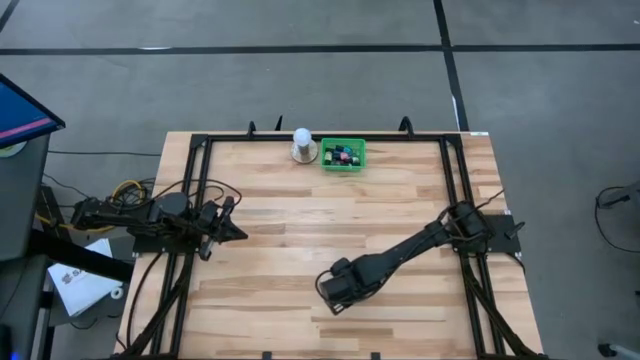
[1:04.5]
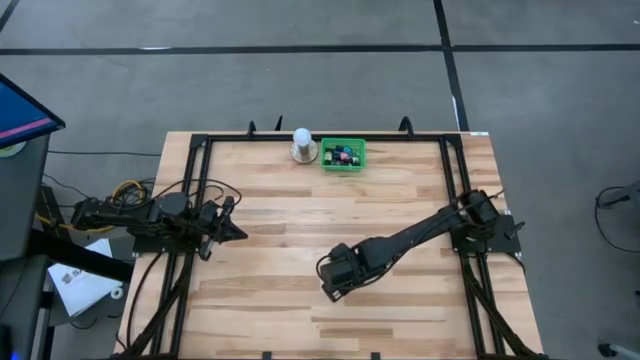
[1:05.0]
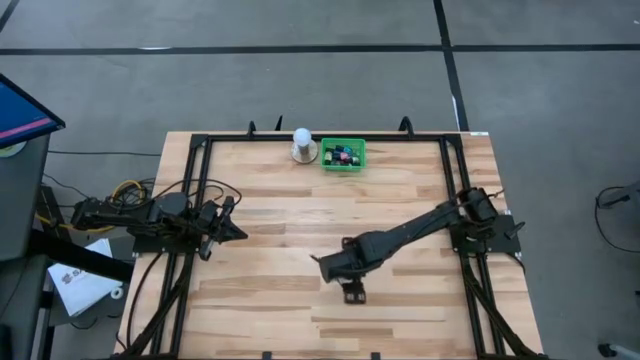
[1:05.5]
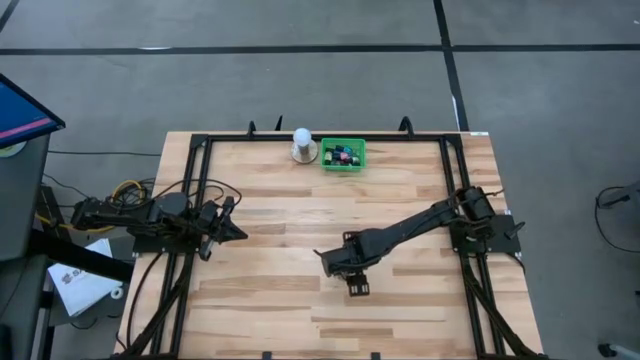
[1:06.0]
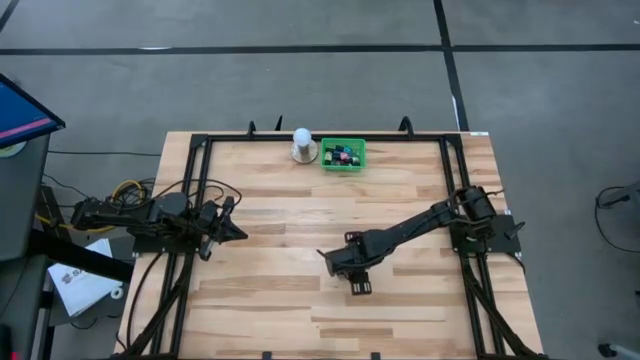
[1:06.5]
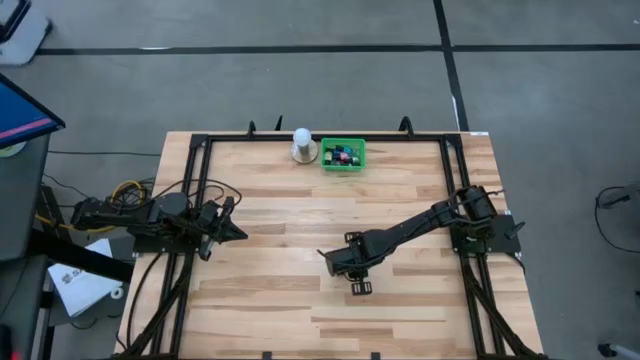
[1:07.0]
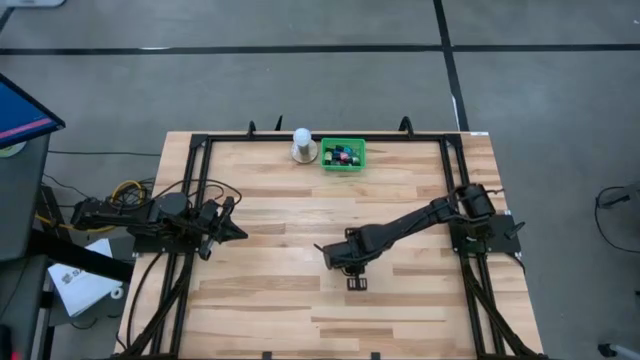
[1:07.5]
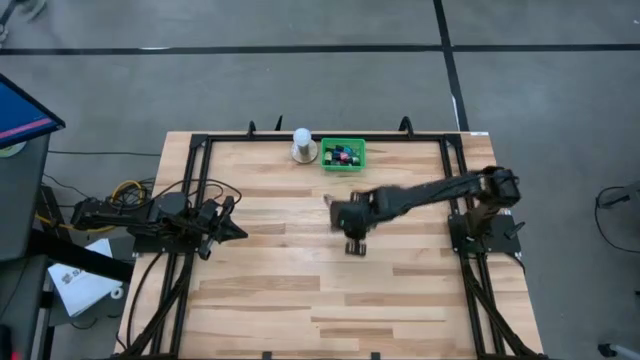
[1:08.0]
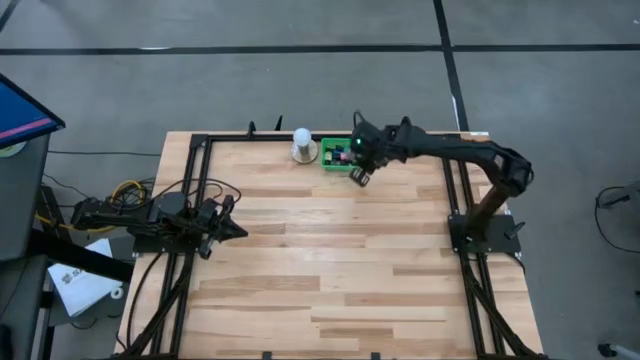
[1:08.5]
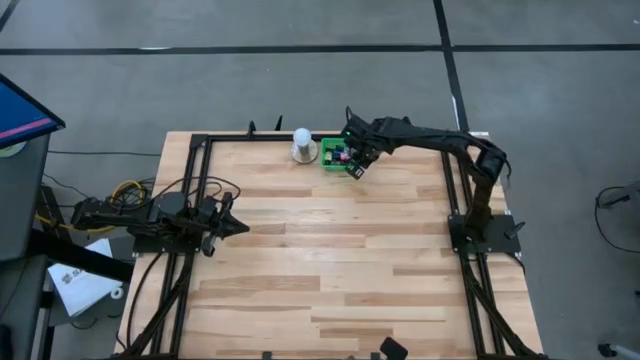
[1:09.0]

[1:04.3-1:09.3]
Task: Pick & Place Nail Polish
Put the brown nail polish bottle into the green basket

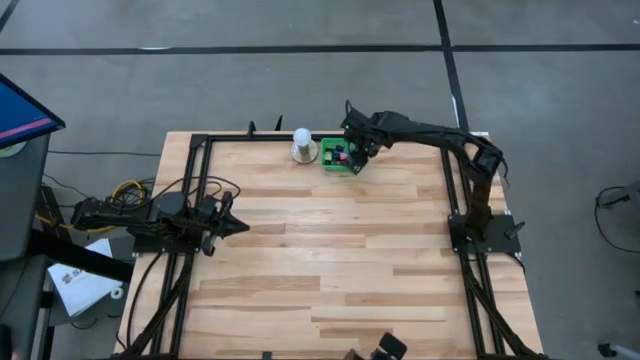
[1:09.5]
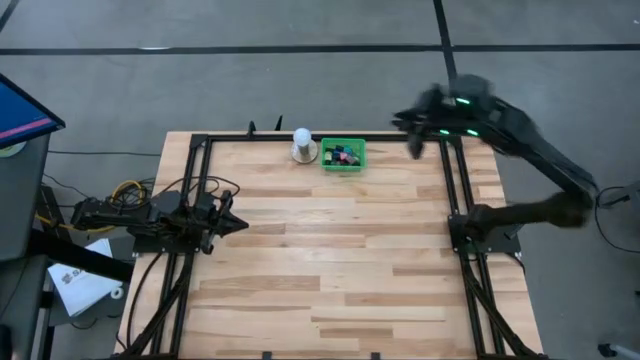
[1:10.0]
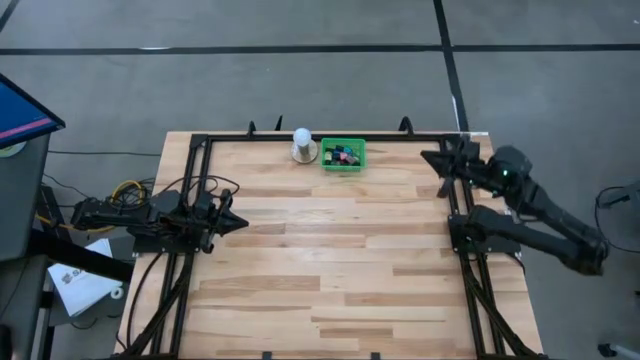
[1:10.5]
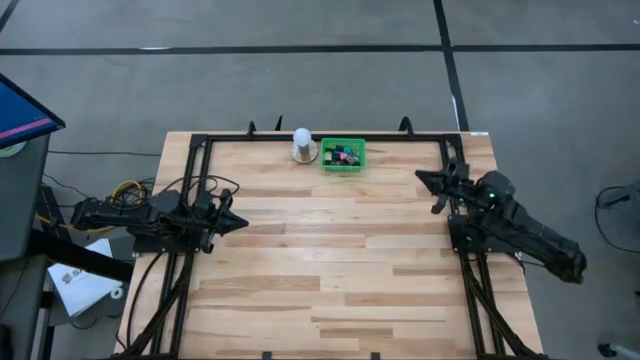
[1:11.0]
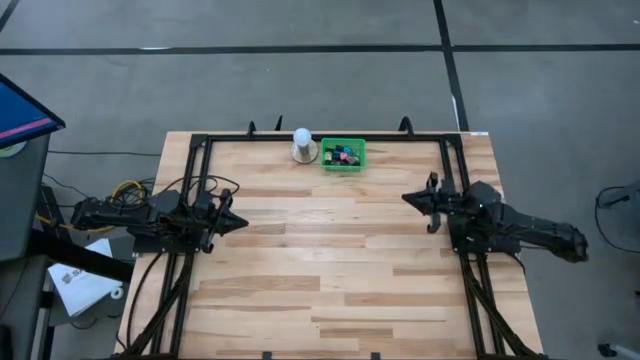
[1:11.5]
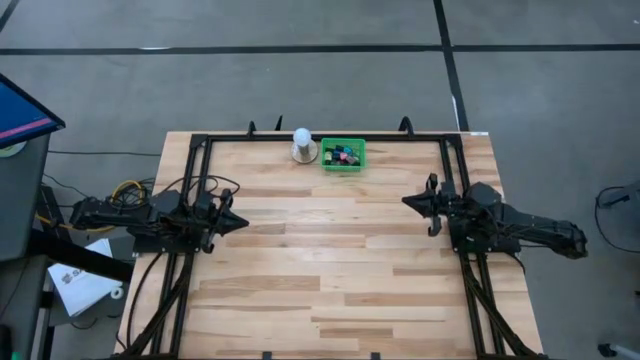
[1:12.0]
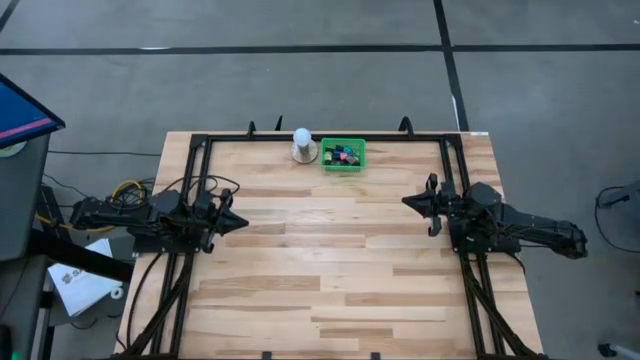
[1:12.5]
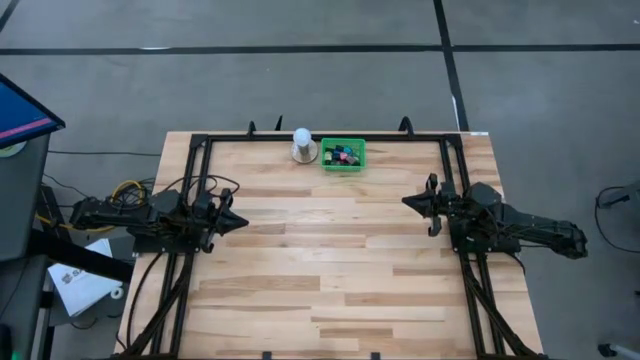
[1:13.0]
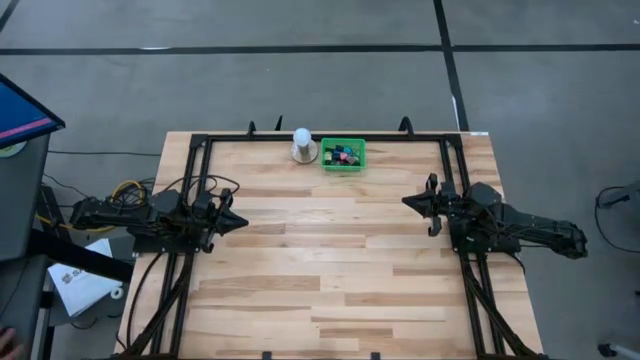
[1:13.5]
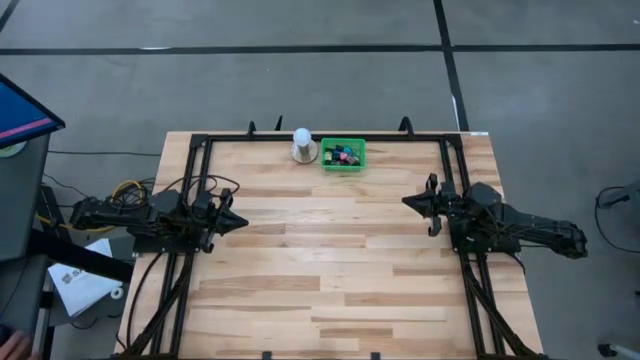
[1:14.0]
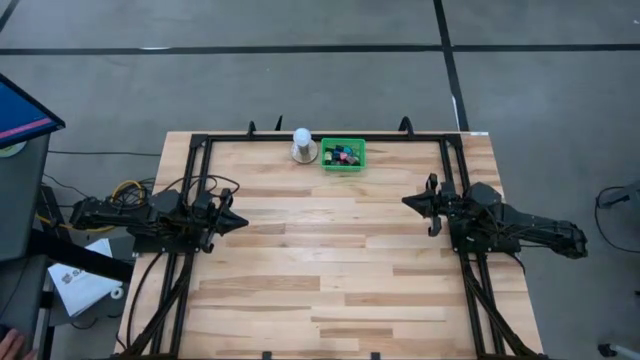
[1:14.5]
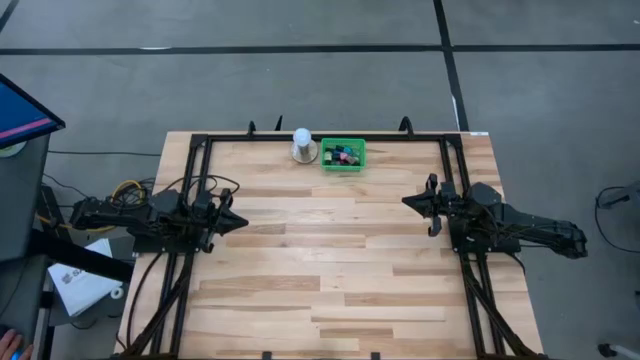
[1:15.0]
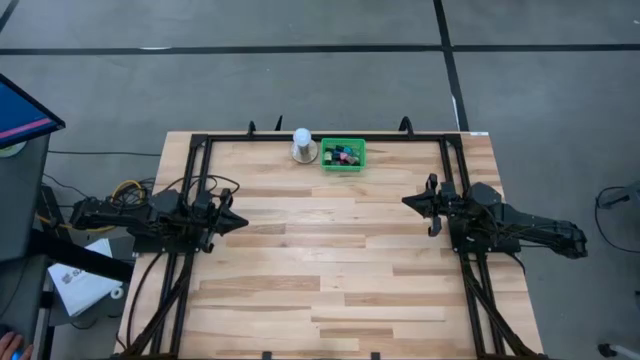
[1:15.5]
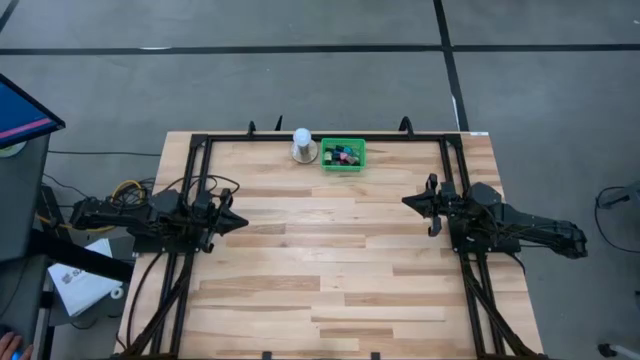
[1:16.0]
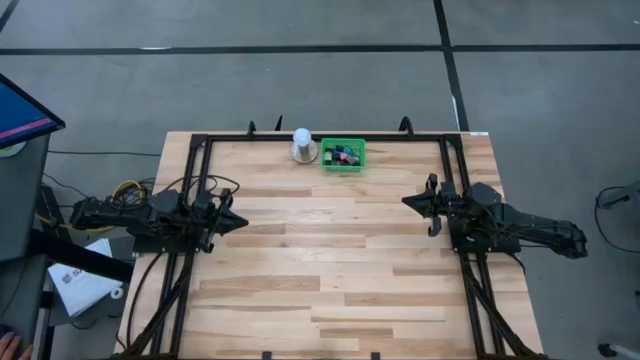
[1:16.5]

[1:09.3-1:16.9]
Return to Home Position

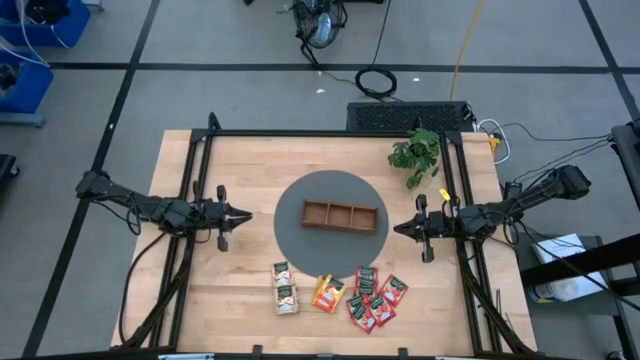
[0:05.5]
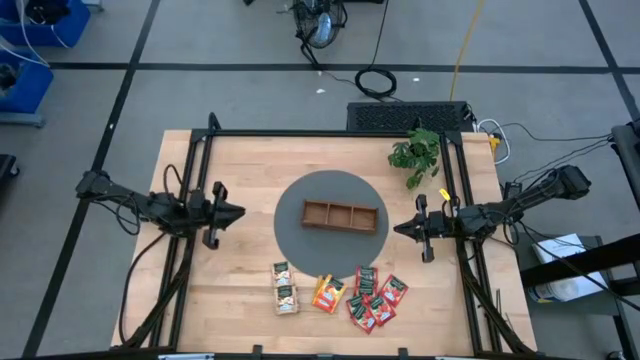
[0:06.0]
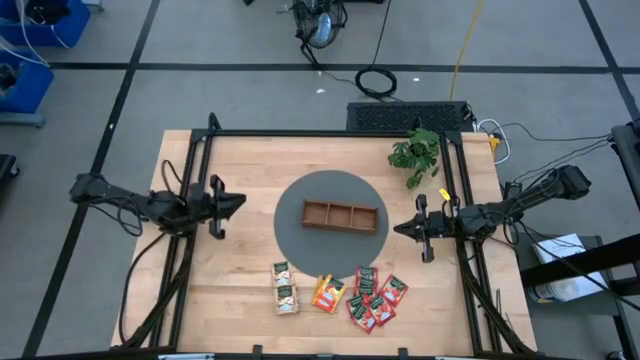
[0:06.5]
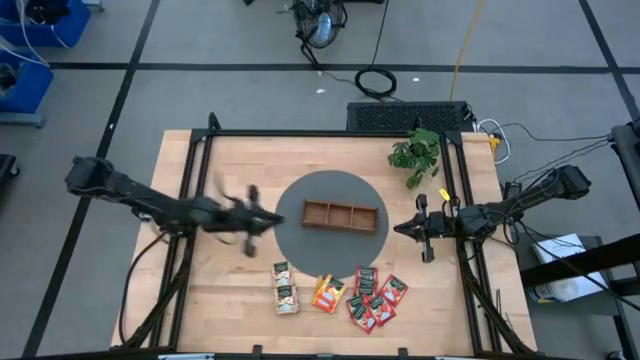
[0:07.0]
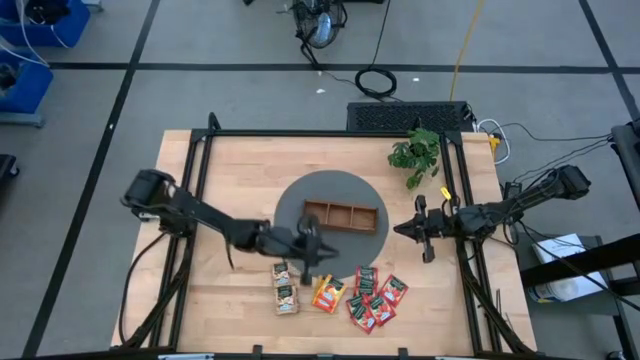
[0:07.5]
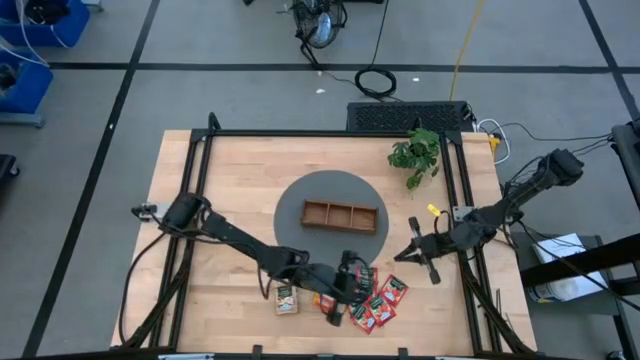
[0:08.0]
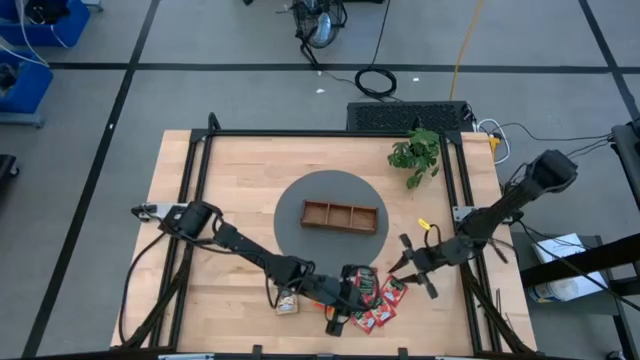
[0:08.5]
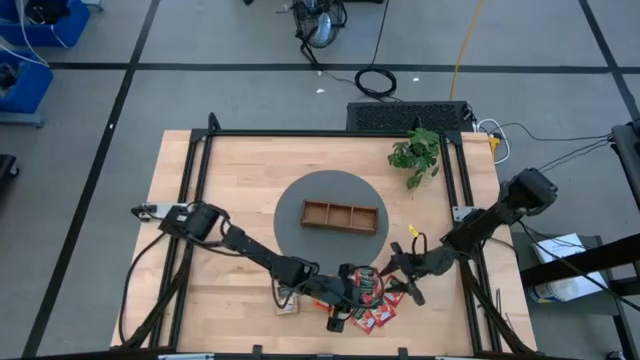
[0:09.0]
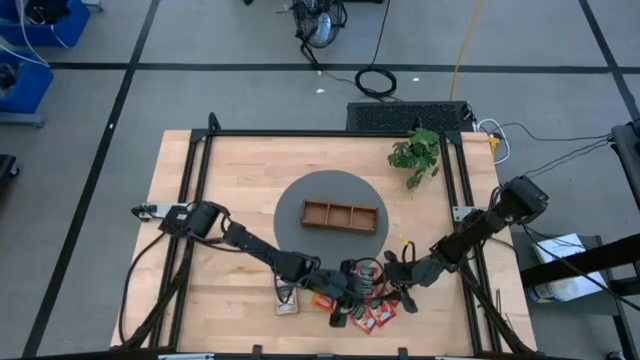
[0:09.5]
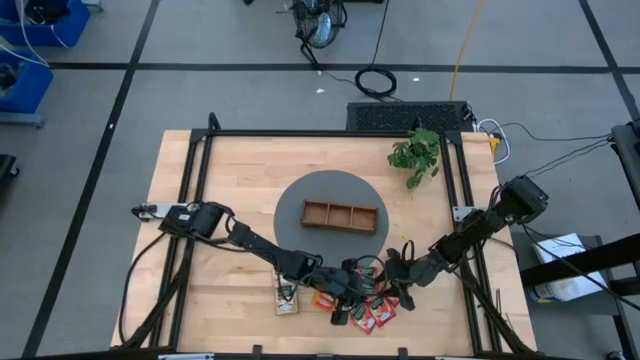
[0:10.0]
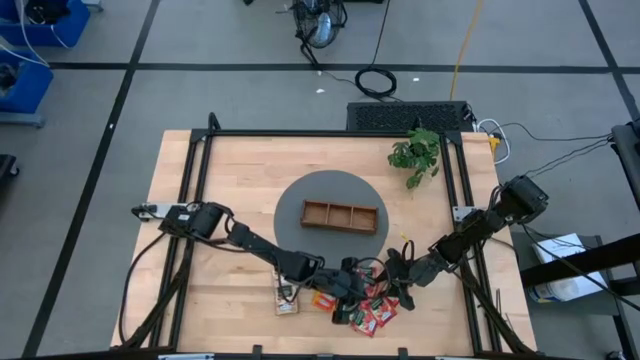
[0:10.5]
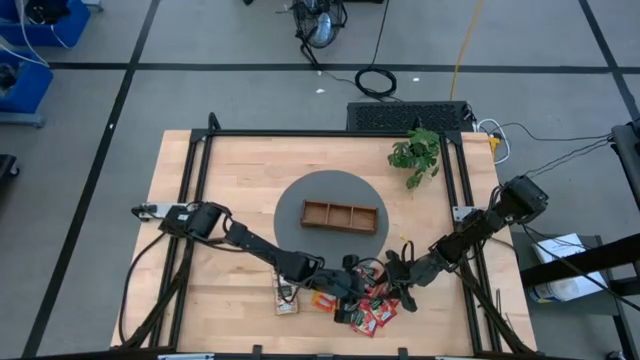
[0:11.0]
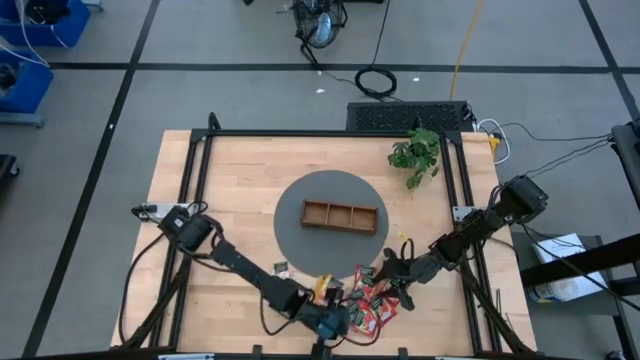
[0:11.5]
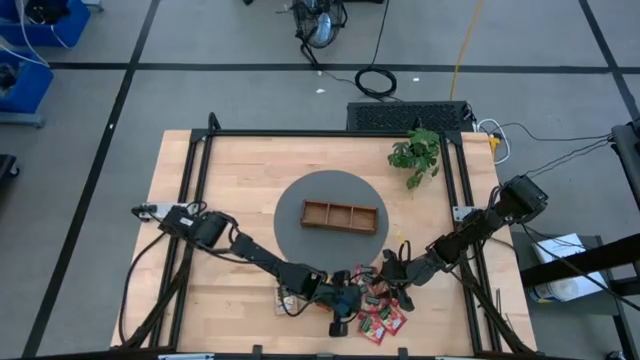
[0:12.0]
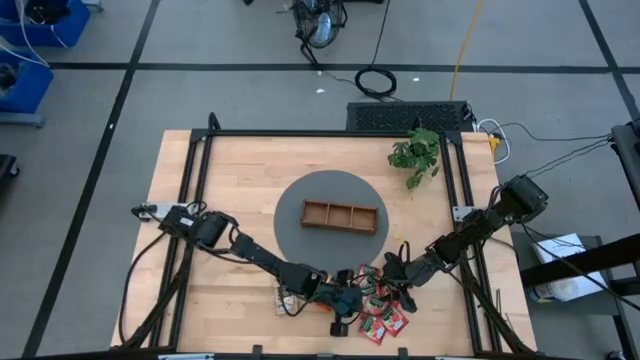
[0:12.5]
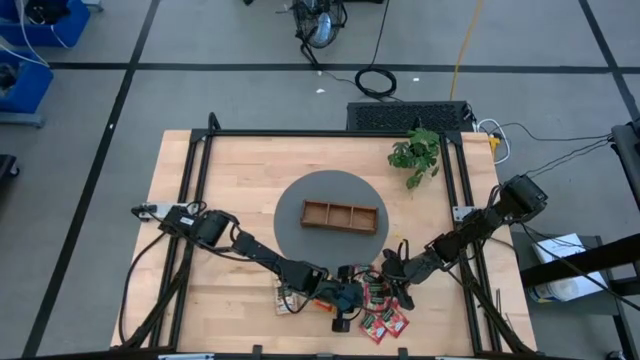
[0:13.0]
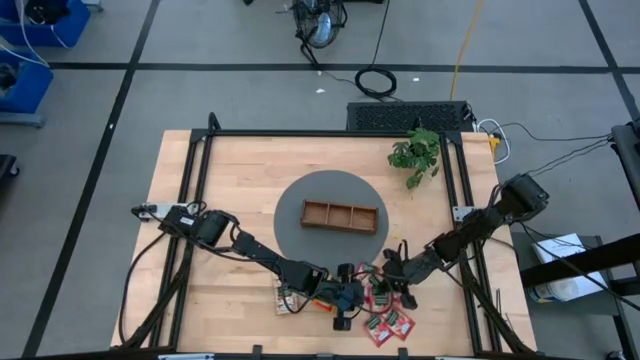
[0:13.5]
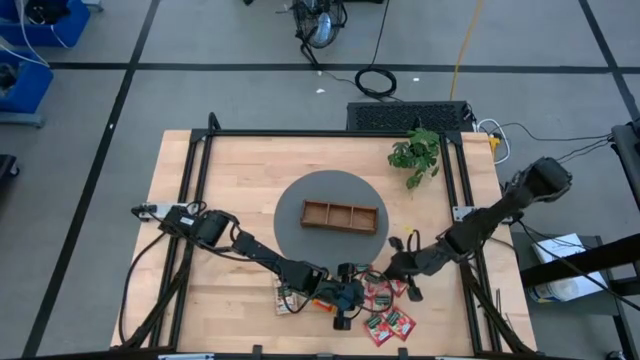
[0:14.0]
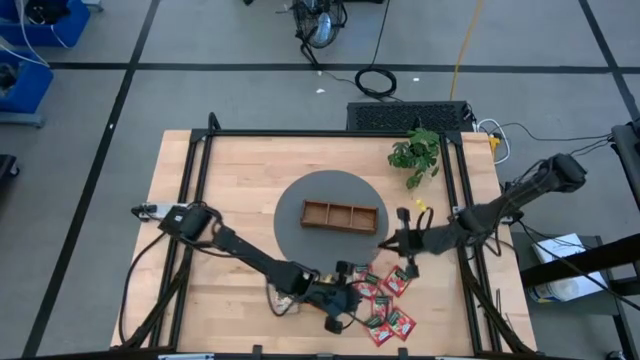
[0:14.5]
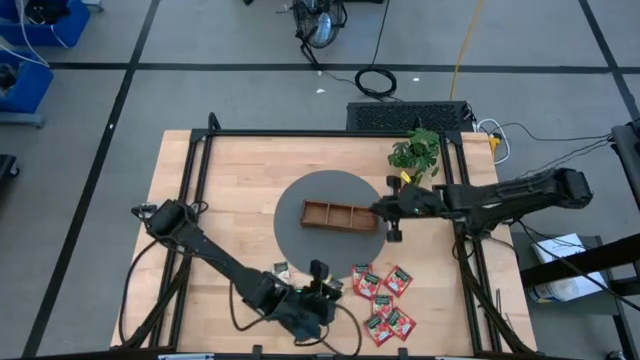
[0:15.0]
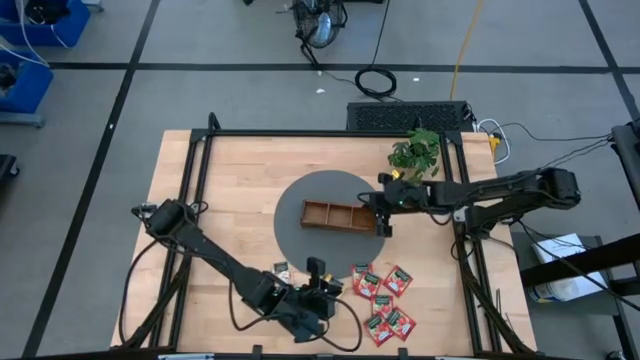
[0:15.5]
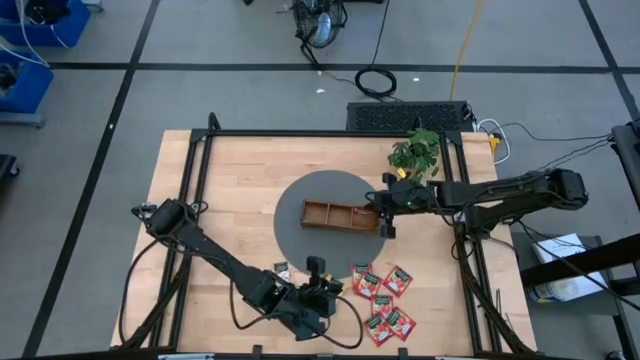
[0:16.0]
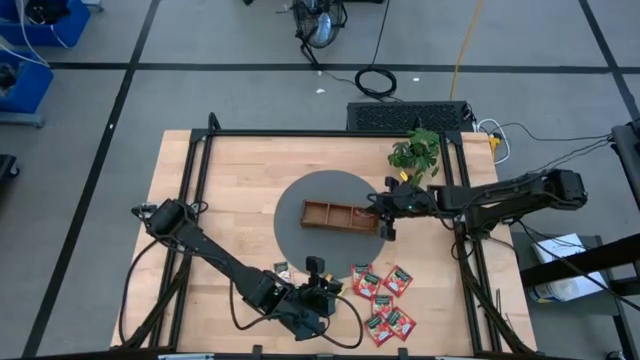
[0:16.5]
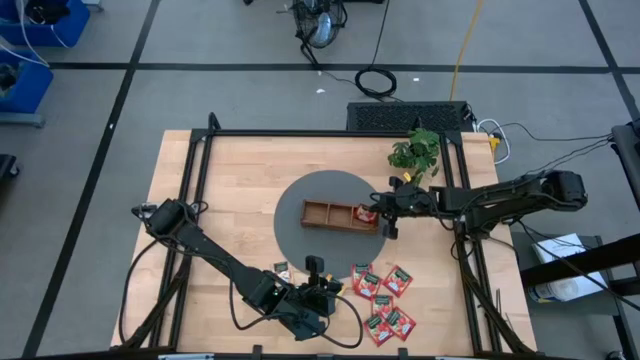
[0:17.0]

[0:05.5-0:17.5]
Task: Pick & Place Tea
Put the red tea bag into the right compartment of the wooden organizer
